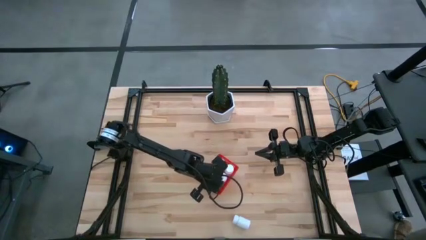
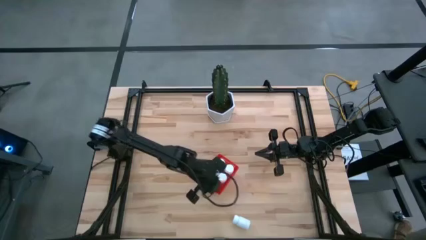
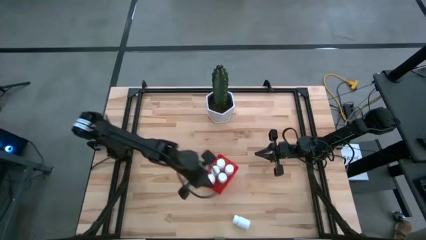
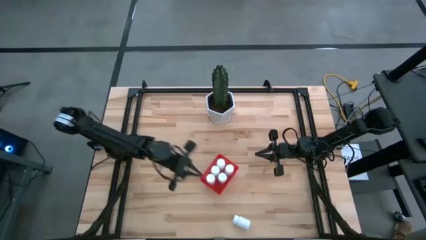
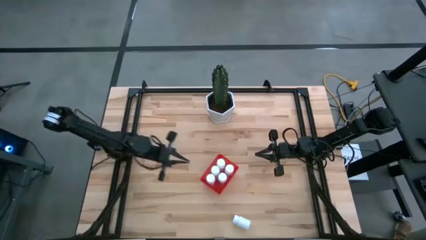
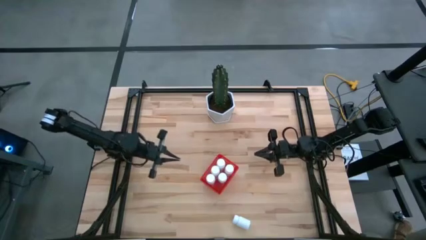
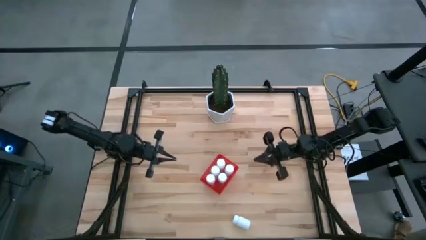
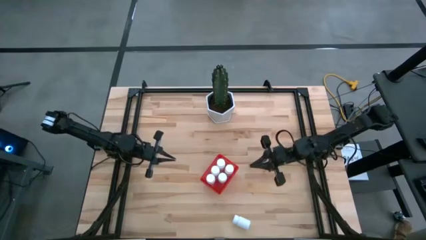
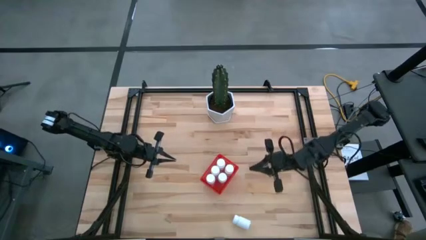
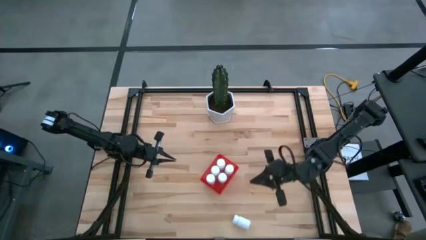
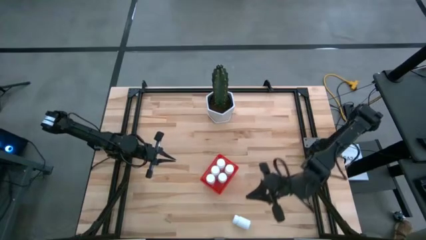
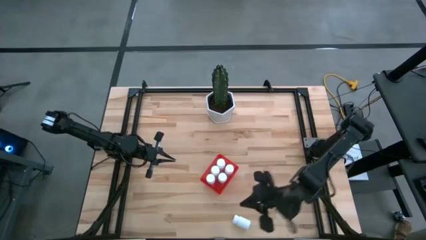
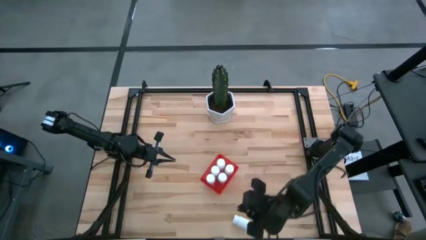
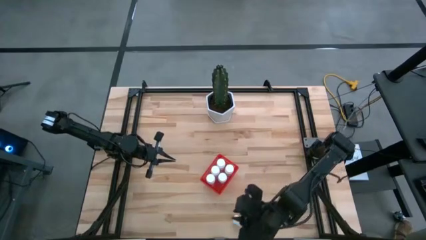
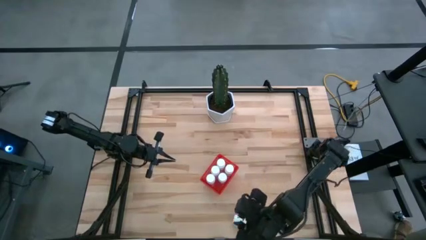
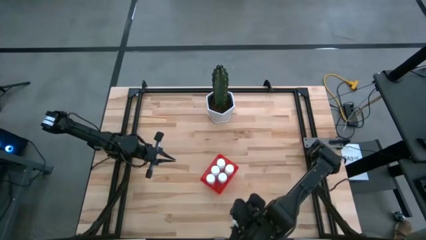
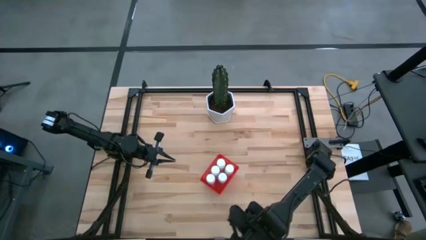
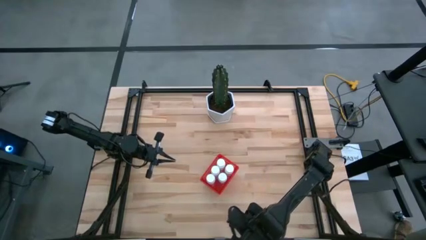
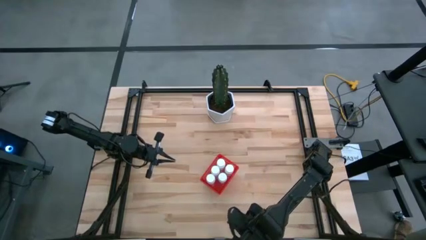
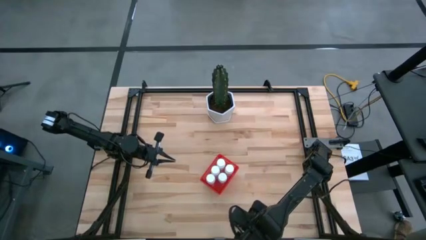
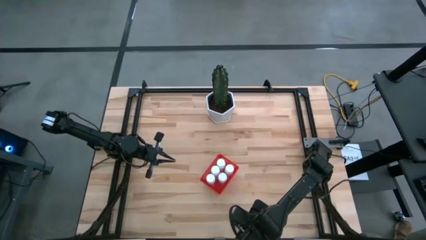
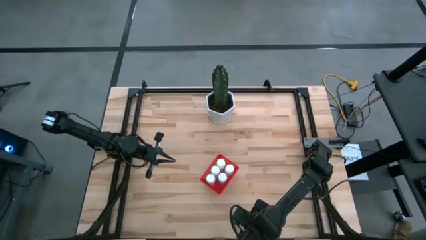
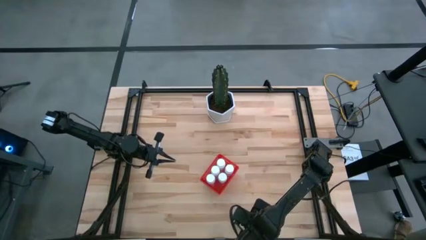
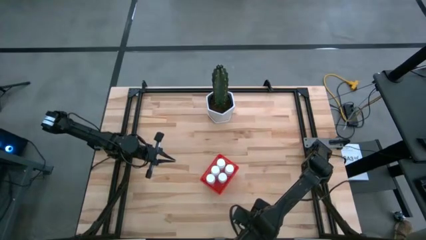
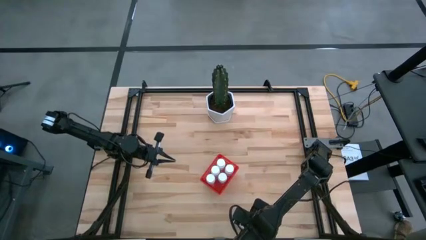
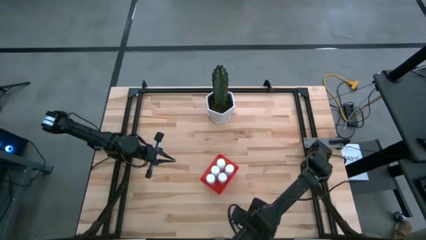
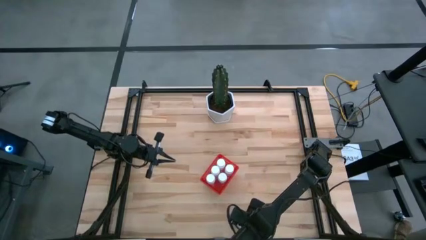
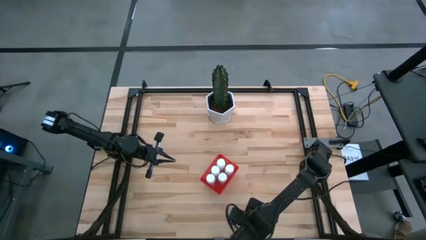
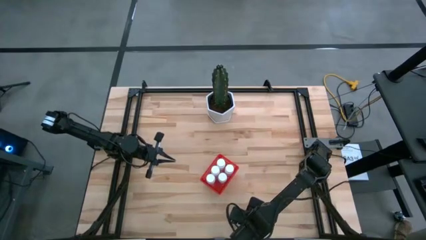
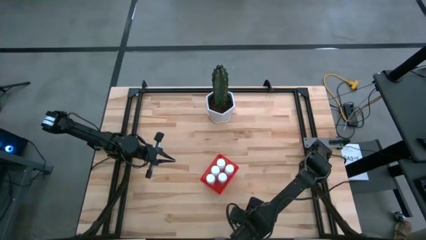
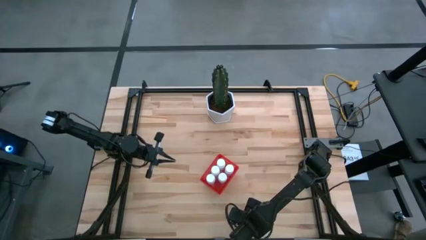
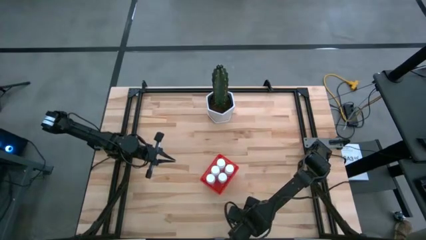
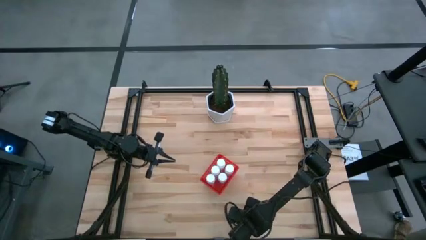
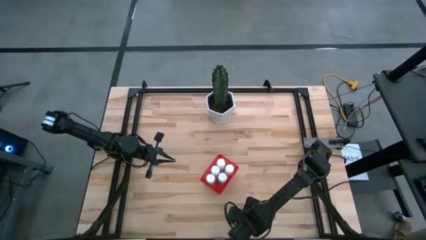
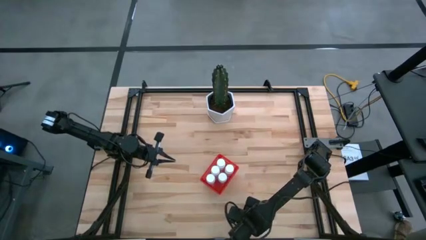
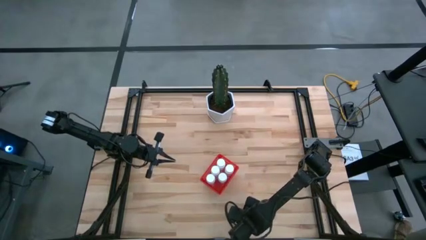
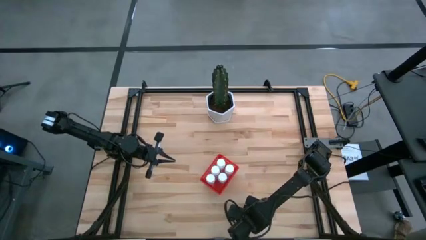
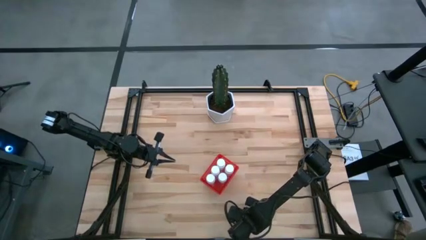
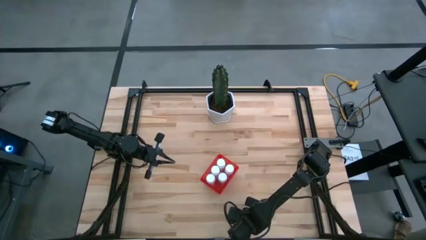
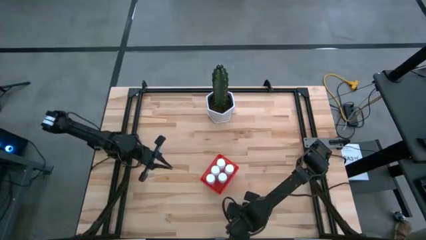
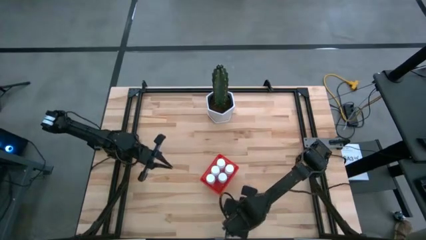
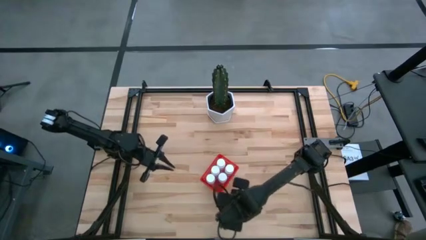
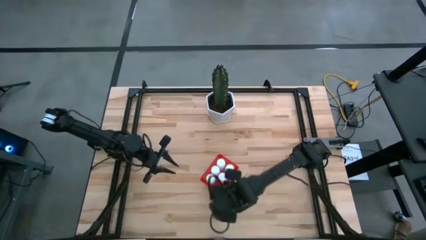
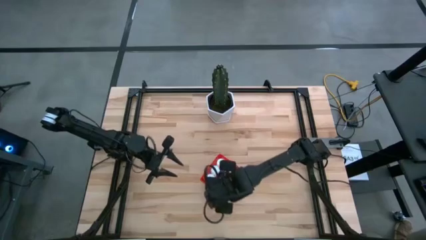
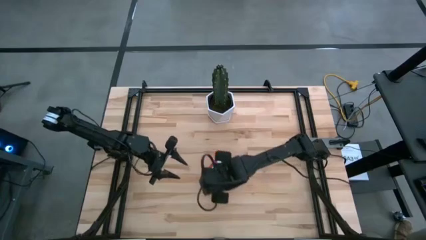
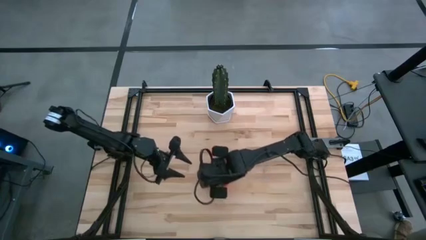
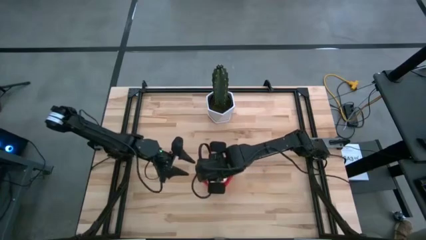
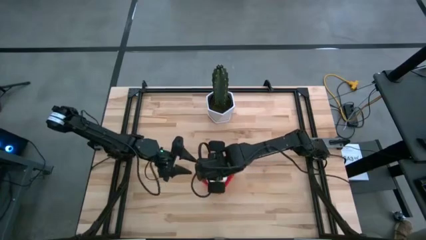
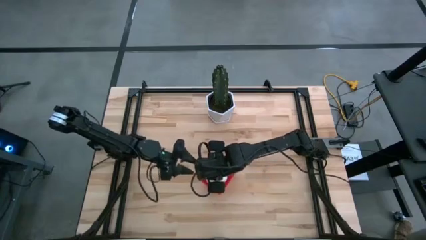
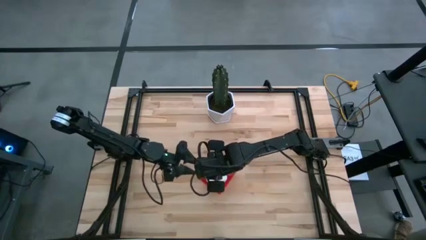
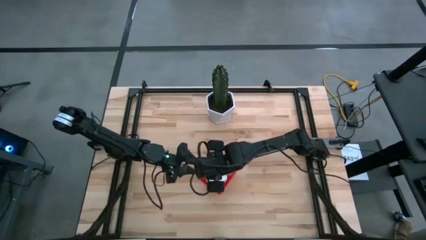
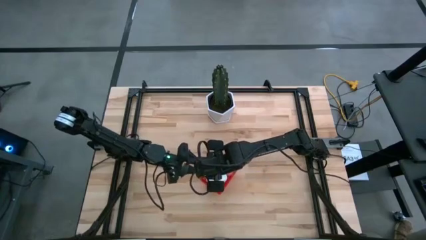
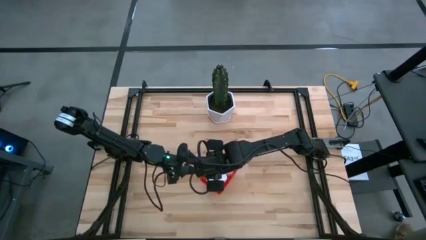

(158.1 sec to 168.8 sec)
Task: Pick and place pill bottles into a basket
Put the white pill bottle into the red bin

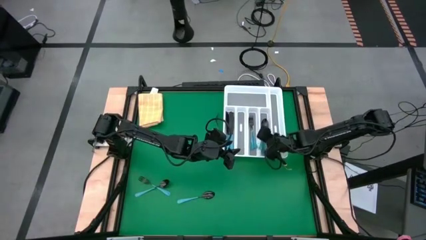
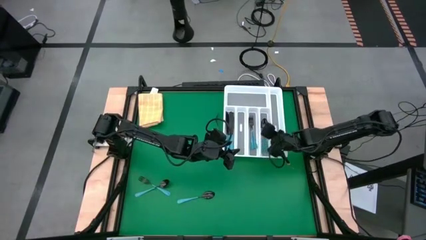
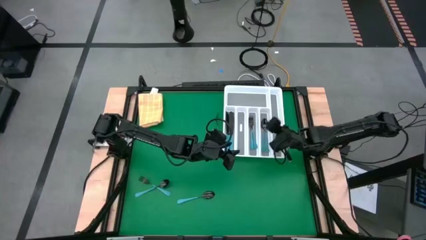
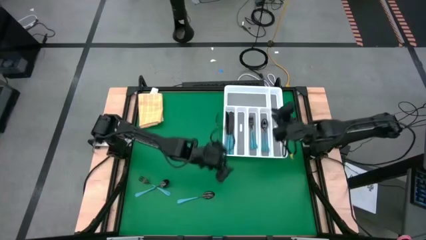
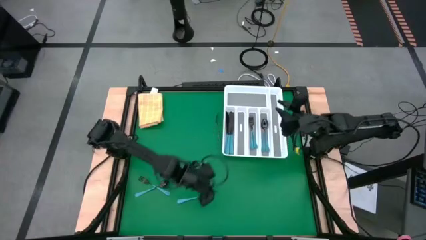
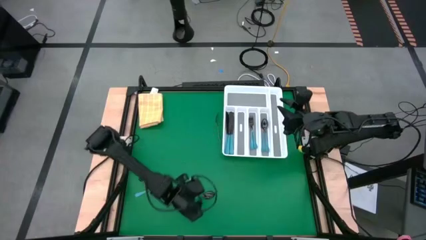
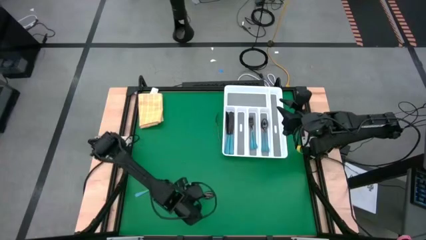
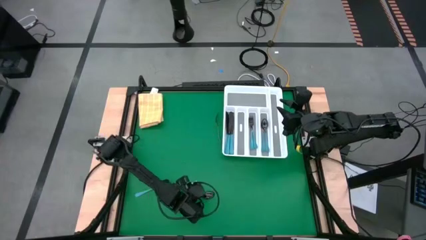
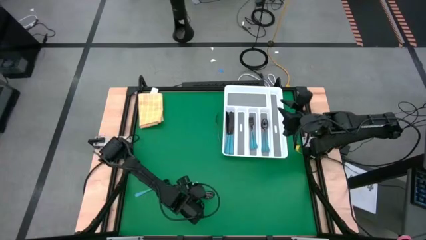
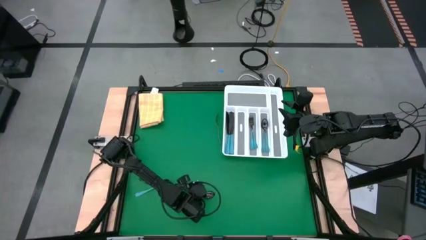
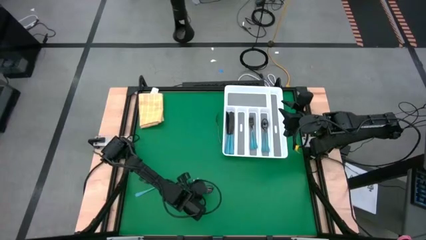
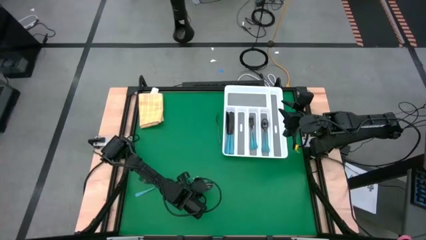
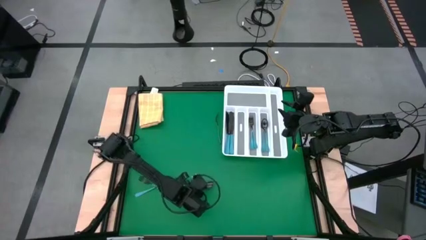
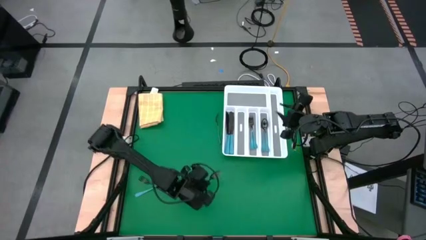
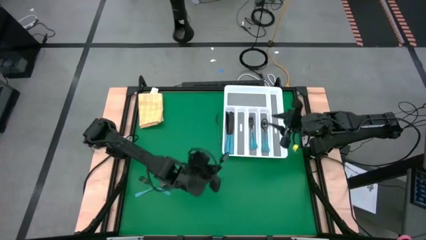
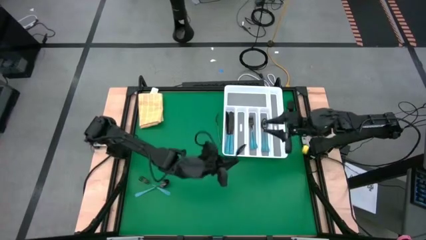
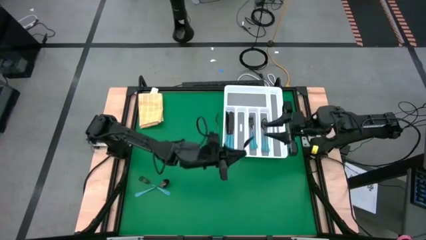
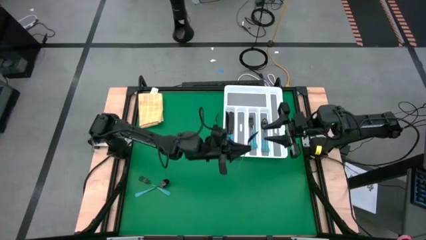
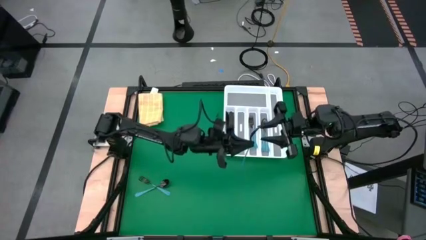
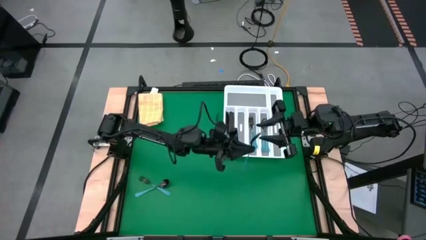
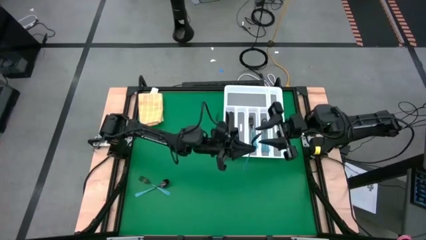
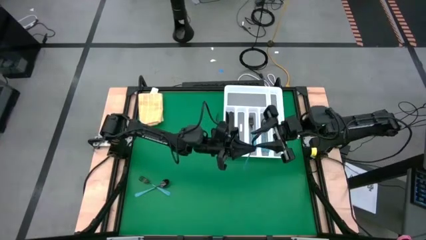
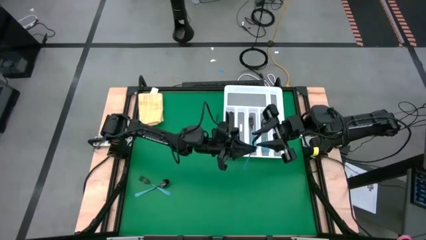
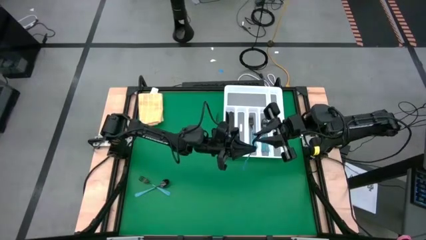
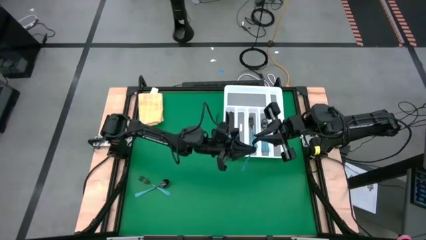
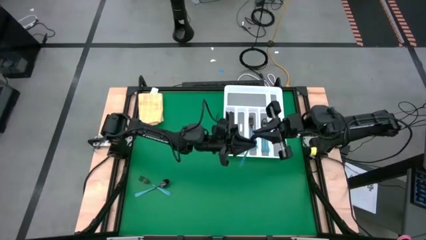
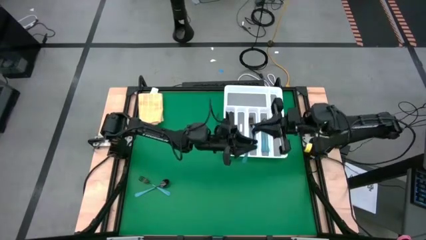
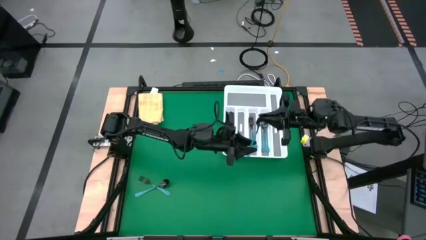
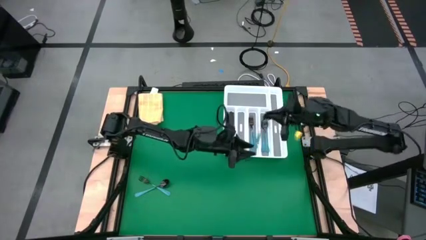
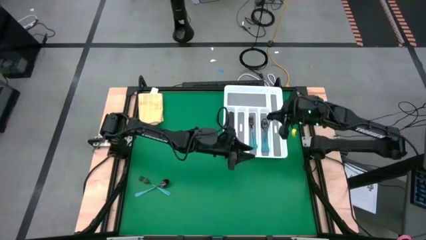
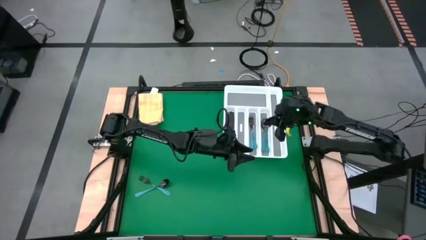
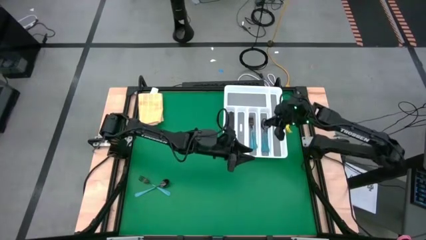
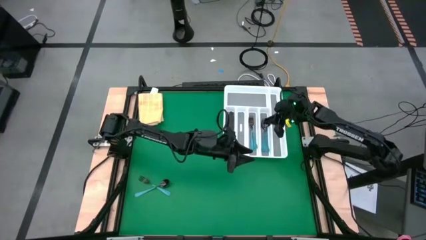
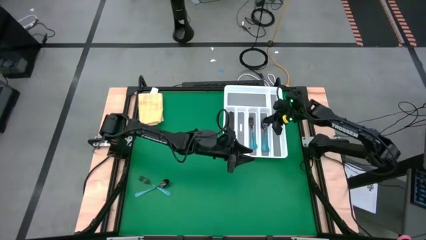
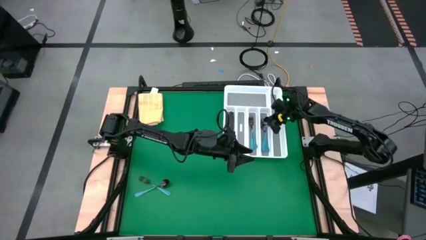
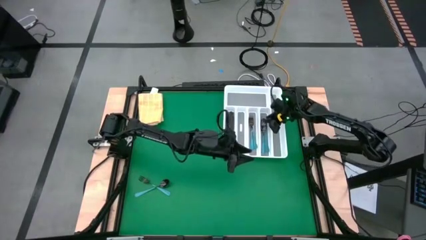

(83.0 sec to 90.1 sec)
Task: Sort silverware
Put the blue spoon into the white cutlery tray
